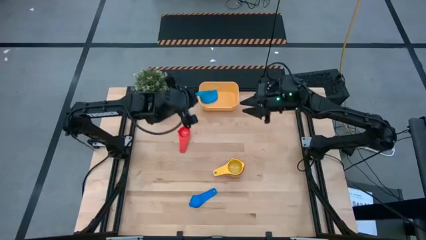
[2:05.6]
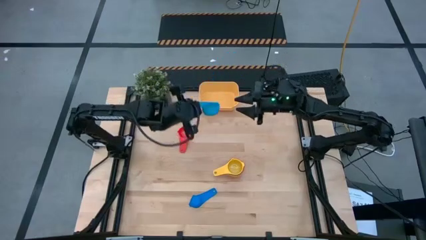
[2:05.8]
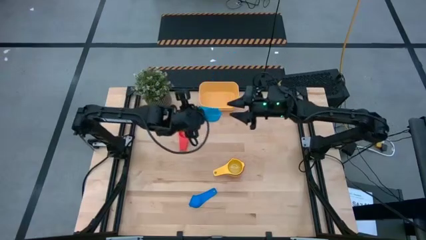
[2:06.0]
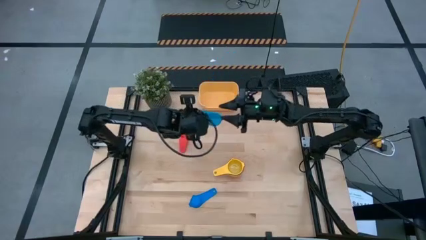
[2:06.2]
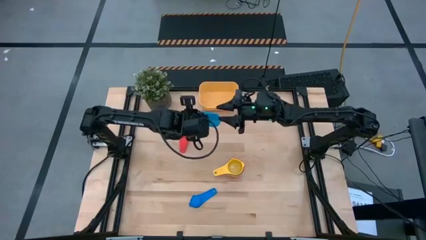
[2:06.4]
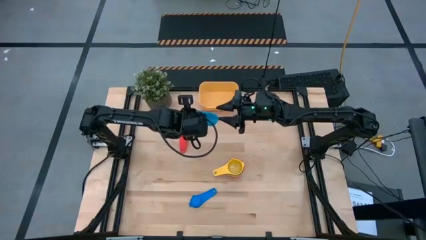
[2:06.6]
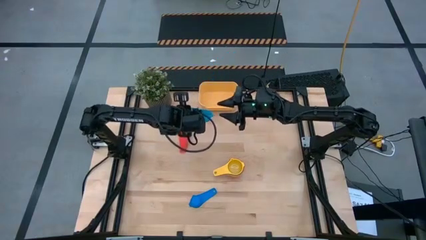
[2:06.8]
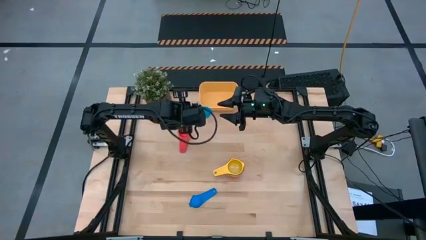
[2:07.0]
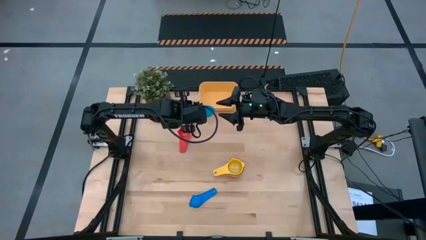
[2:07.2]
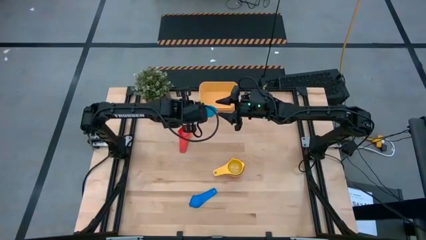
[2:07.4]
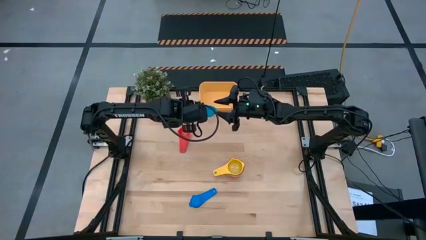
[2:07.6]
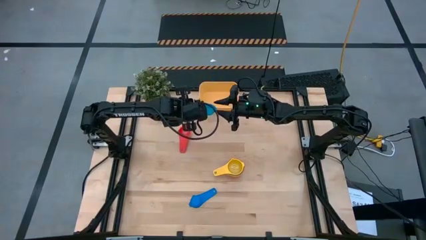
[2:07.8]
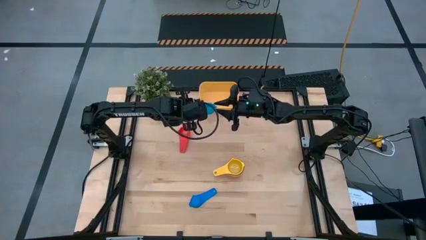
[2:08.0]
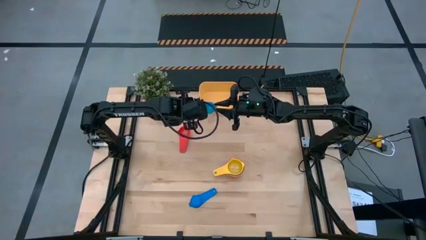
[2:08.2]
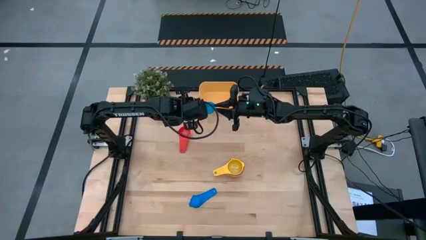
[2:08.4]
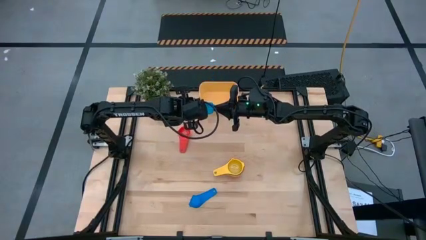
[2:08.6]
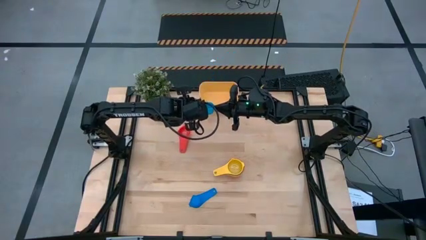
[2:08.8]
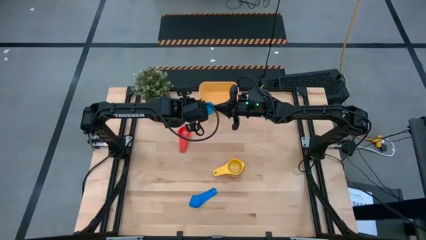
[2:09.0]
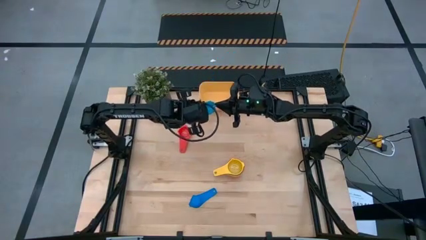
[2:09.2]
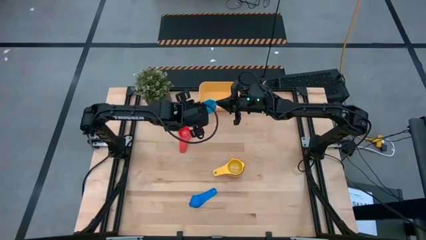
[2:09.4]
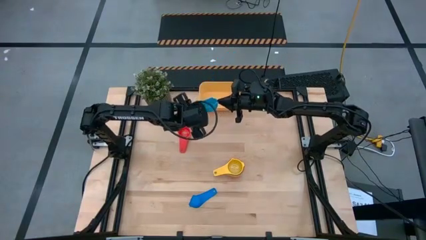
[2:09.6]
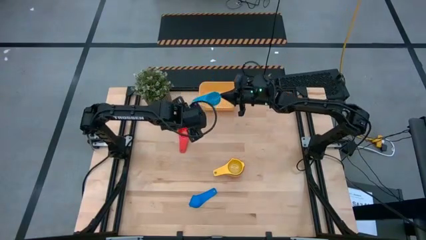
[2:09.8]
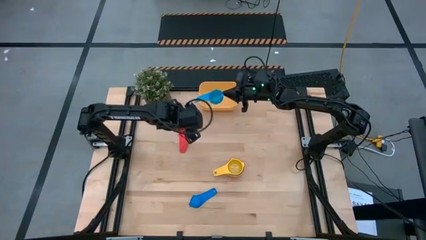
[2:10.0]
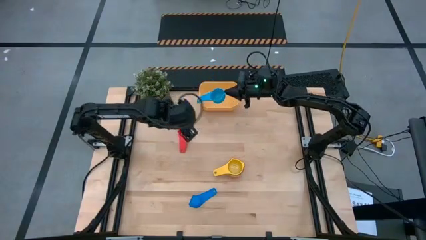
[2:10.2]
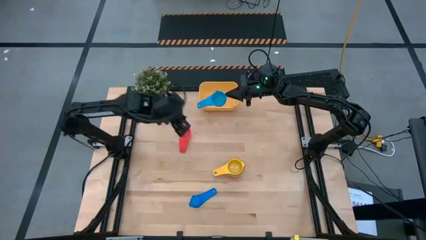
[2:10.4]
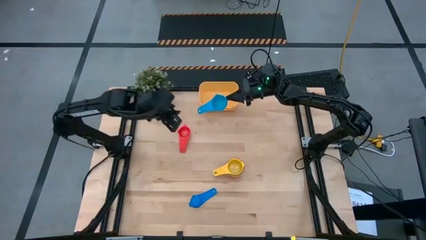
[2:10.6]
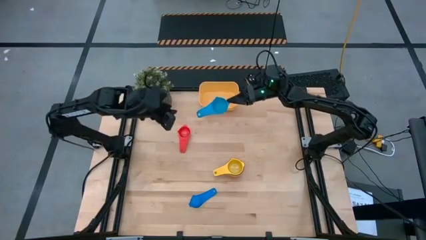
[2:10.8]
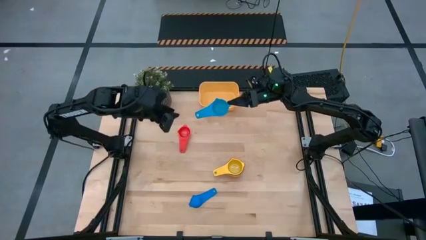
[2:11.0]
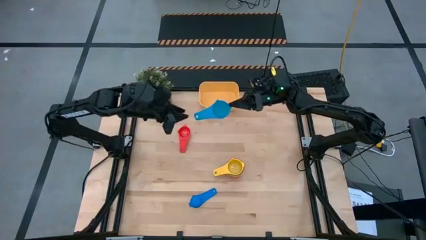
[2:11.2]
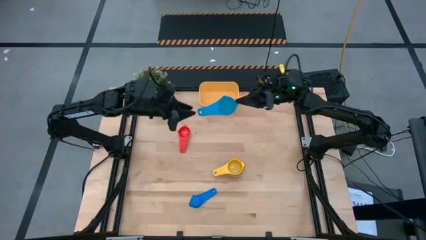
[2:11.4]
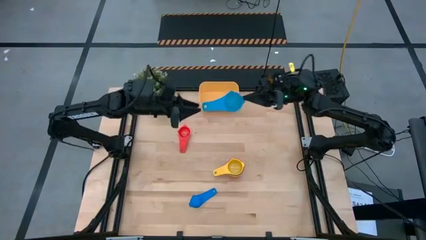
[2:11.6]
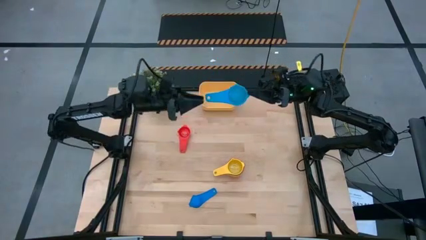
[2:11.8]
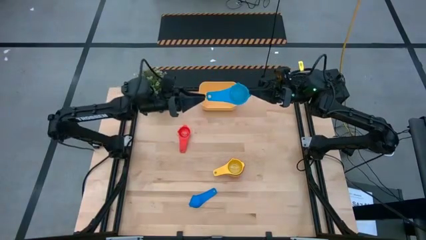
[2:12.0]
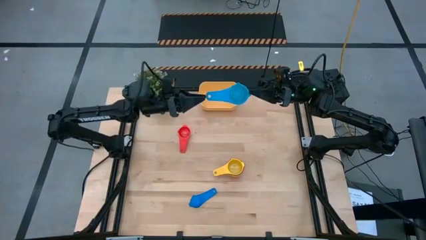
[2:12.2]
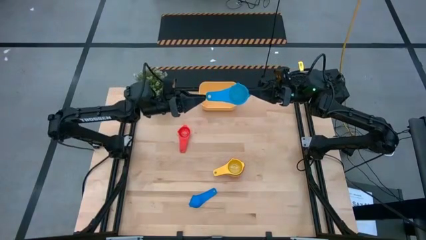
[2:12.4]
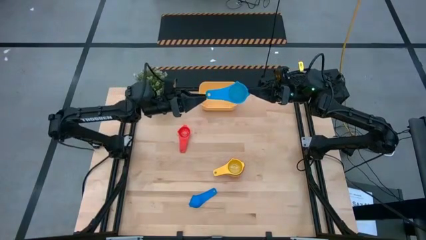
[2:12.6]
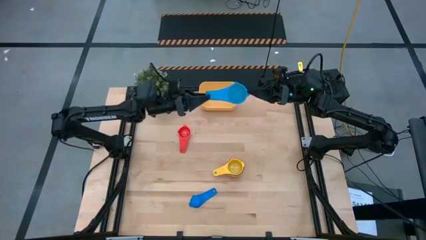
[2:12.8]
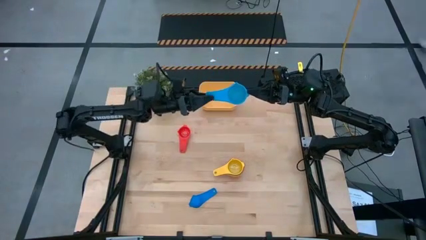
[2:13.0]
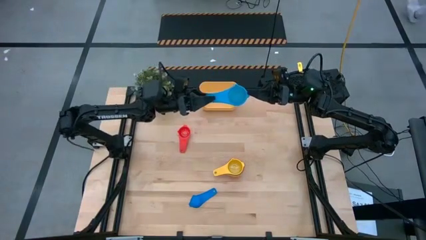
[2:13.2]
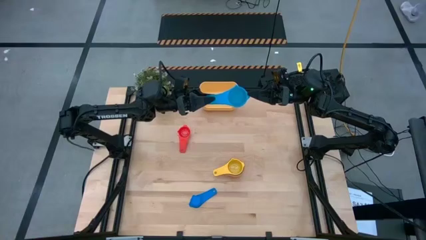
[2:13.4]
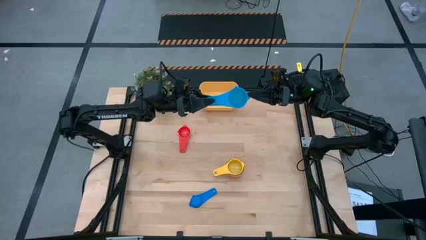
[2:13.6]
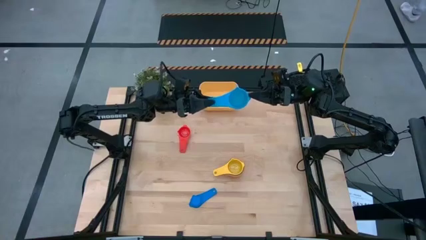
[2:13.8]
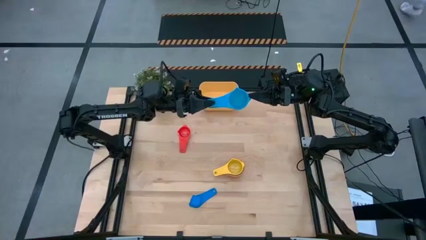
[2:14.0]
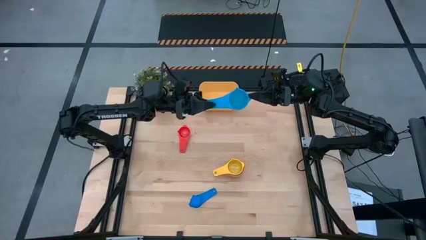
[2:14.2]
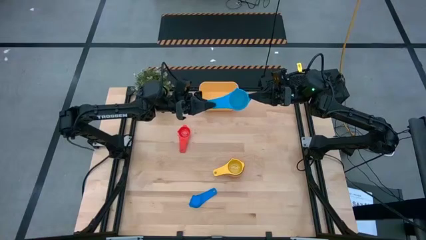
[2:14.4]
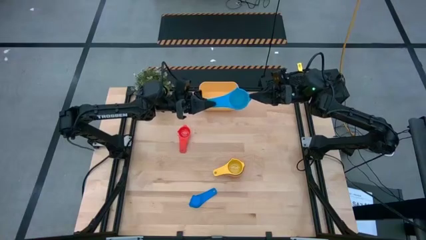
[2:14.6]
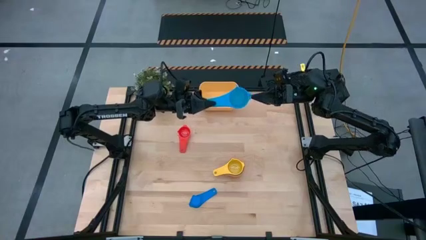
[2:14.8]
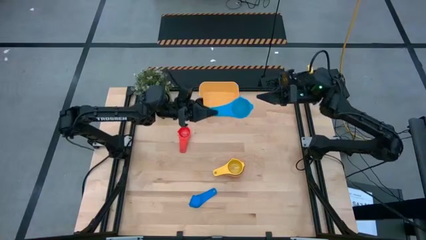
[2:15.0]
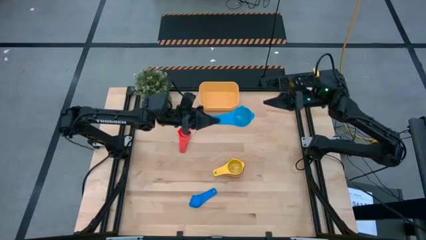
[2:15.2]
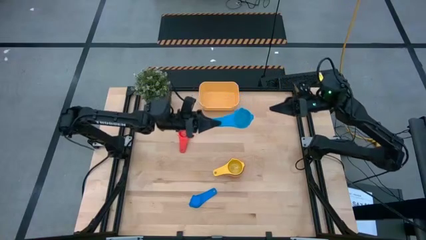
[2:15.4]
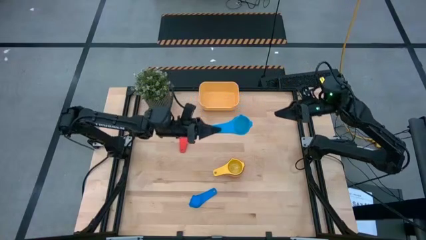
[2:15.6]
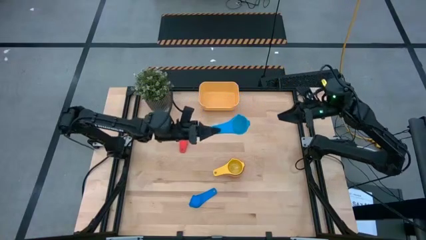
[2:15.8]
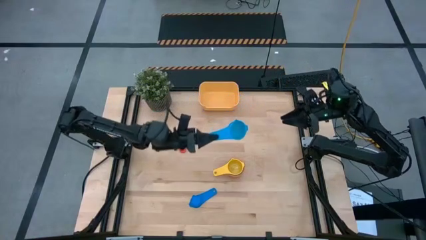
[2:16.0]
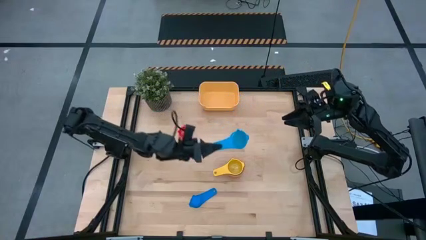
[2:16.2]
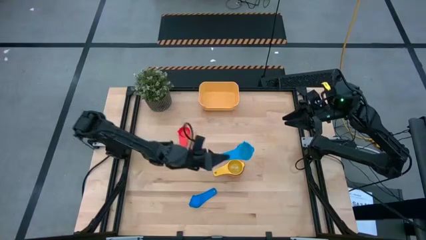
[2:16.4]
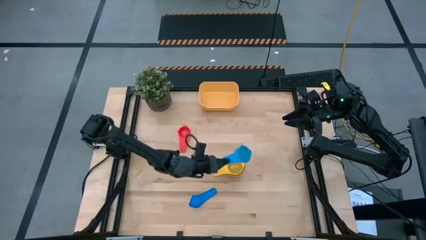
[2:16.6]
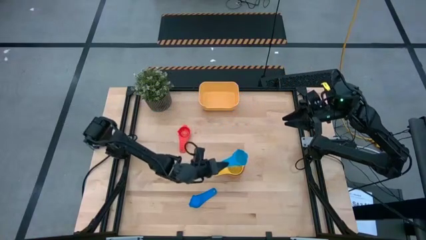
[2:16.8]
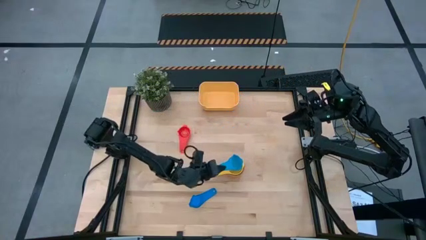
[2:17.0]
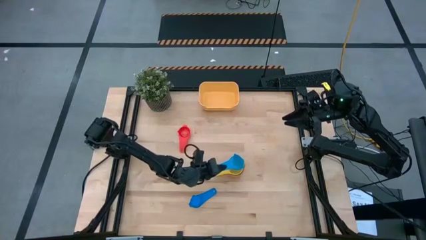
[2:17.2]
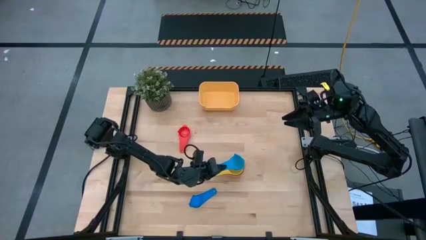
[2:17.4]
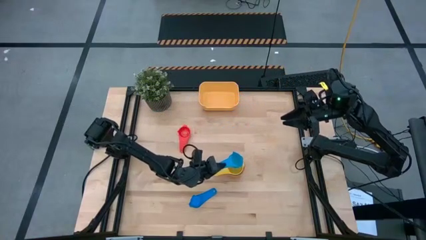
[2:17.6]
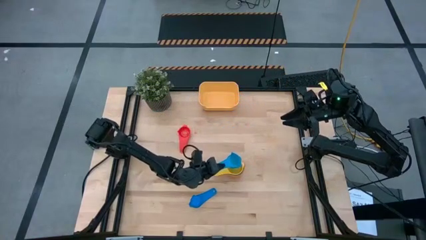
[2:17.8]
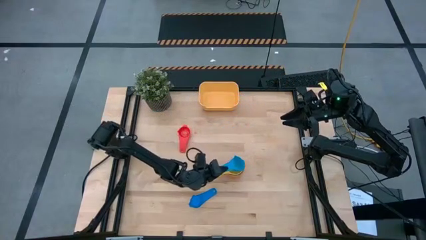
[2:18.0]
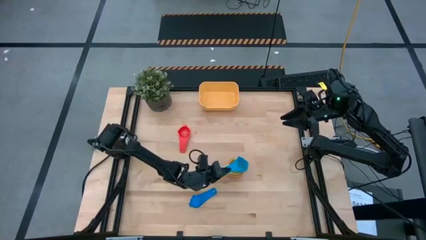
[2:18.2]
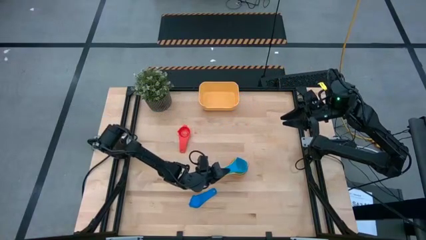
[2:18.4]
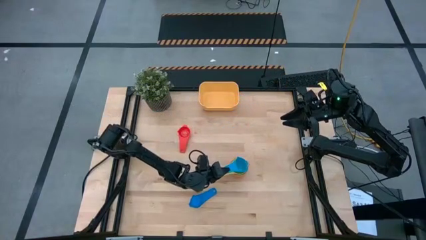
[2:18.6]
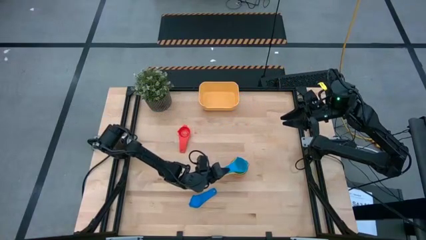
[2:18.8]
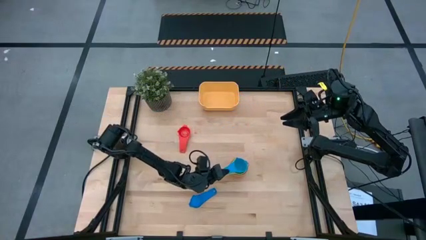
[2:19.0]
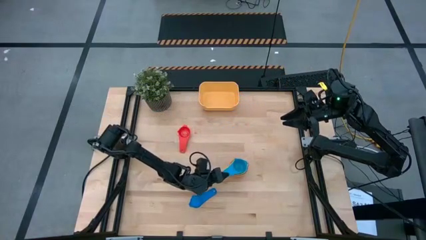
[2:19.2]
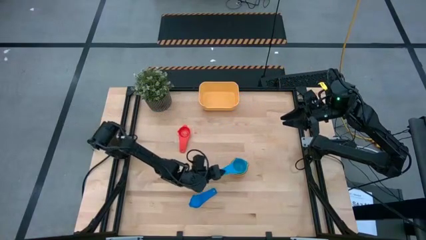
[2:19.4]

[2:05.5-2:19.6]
Task: Nest measuring cups in basket
Stack the light blue measuring cup on top of the yellow measuring cup

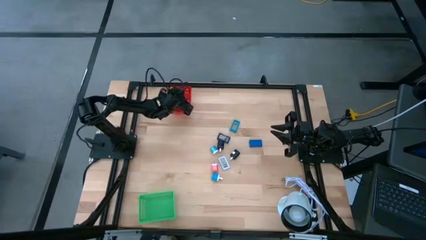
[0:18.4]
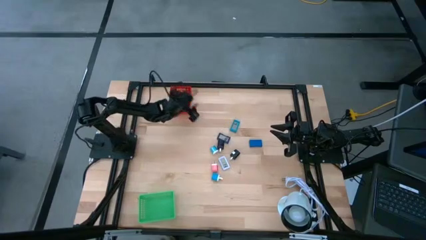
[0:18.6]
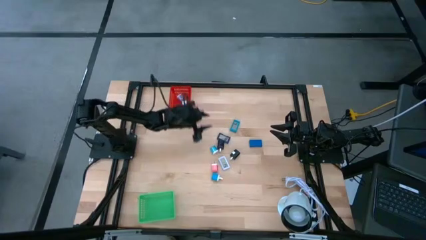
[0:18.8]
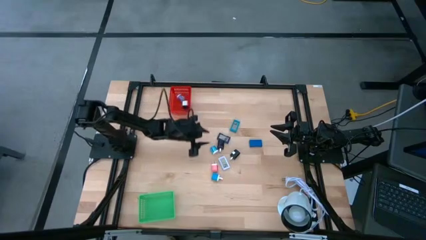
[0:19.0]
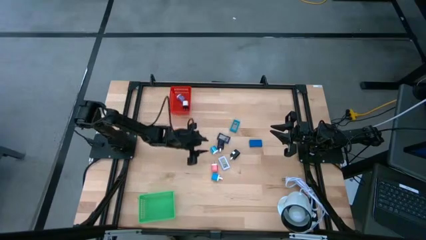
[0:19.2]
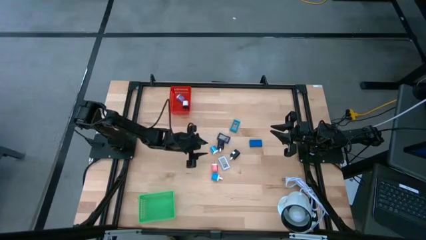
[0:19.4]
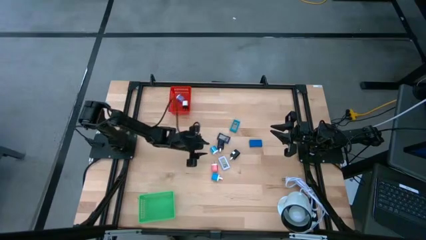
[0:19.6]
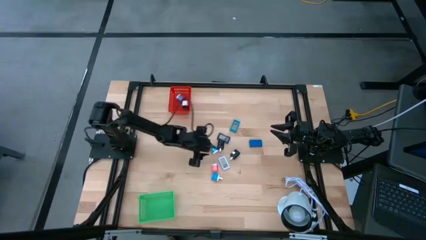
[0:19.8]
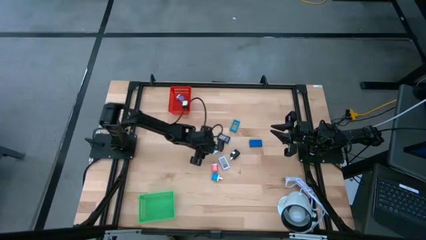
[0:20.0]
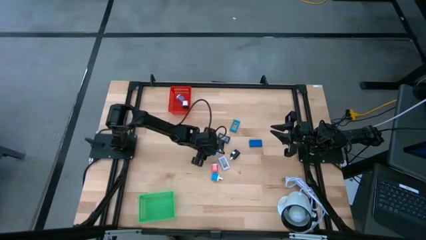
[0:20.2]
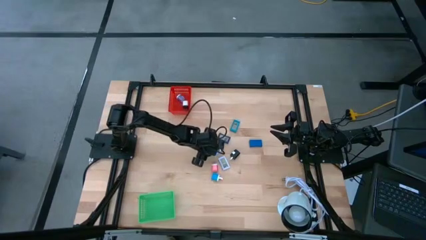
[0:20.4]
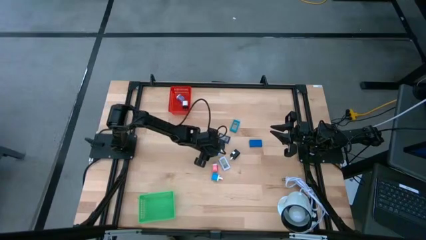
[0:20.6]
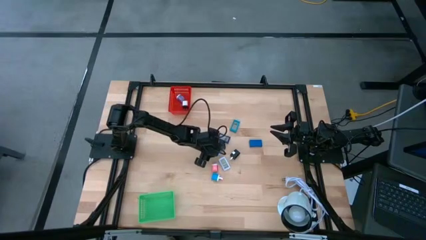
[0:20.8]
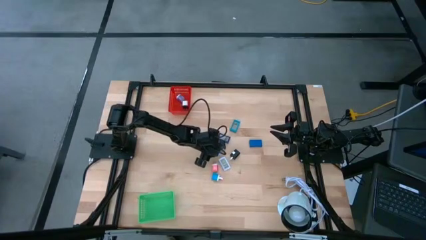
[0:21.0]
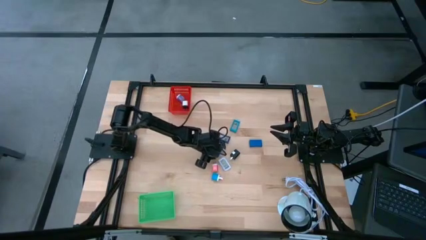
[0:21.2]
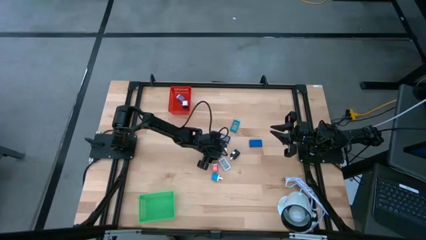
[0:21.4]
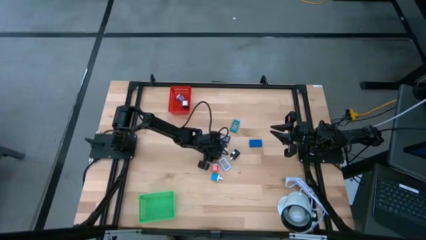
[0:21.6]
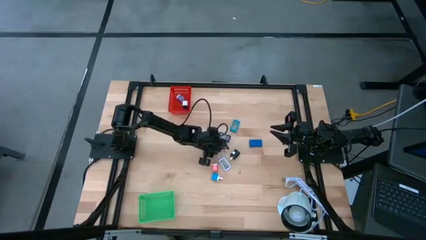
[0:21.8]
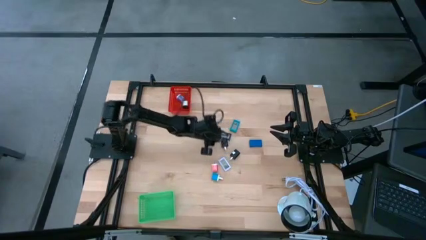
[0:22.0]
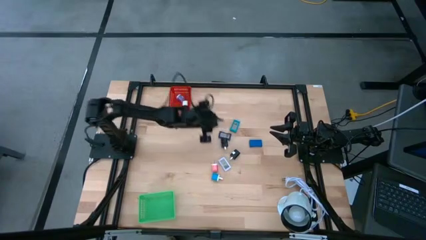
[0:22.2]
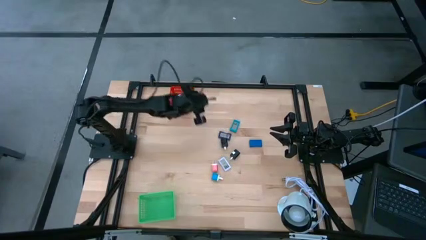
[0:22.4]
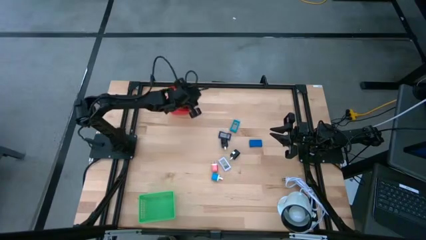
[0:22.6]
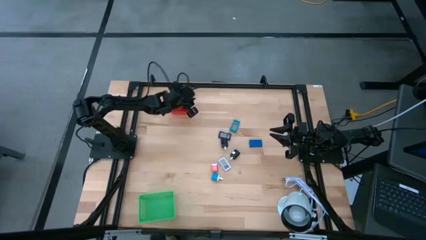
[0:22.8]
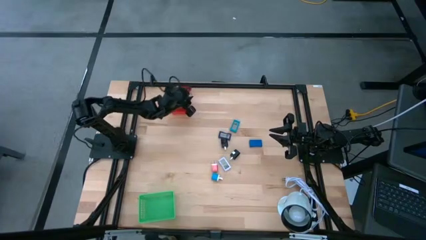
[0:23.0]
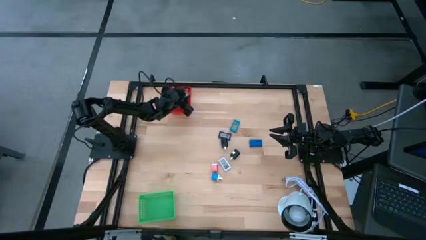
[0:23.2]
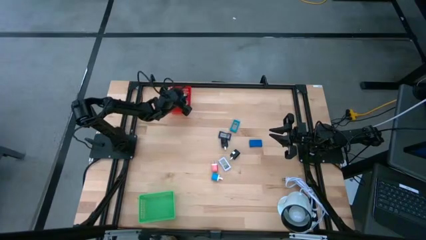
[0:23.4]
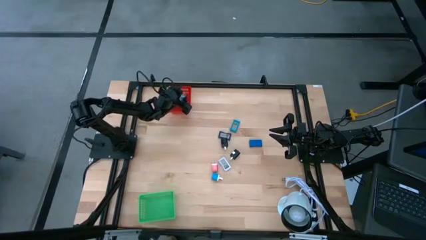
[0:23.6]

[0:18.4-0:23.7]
Task: Pick & Place Office items
Put the top blue charger adapter into the red bin
